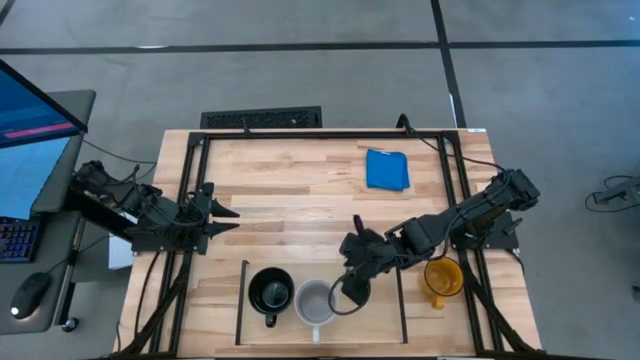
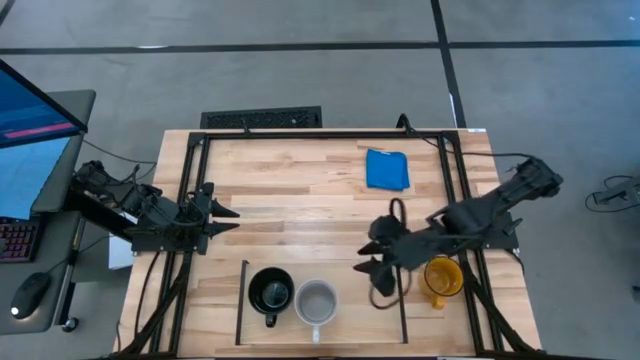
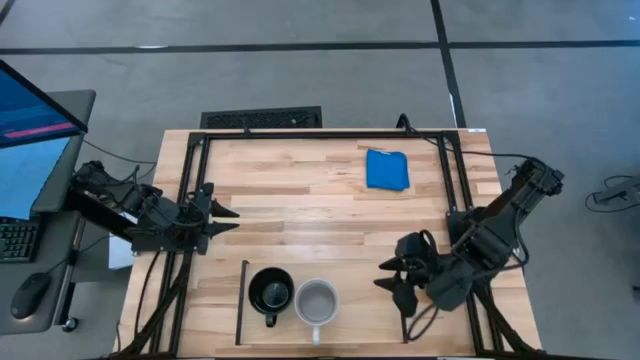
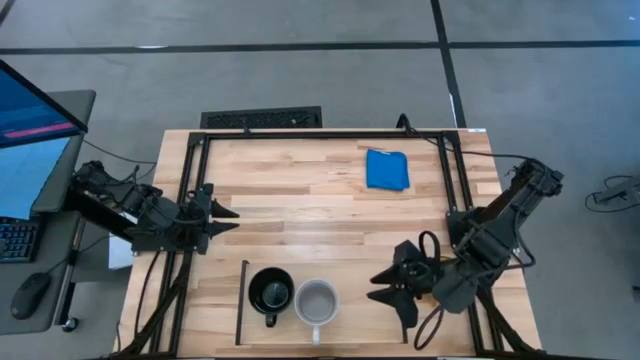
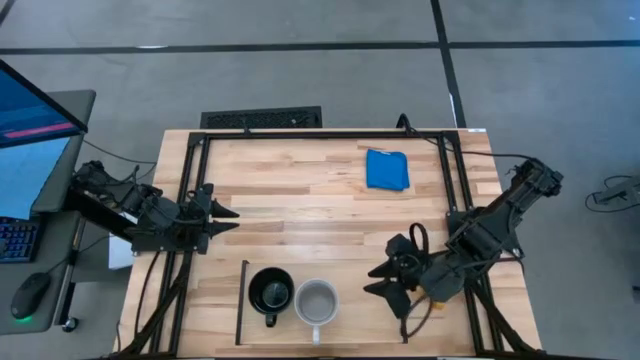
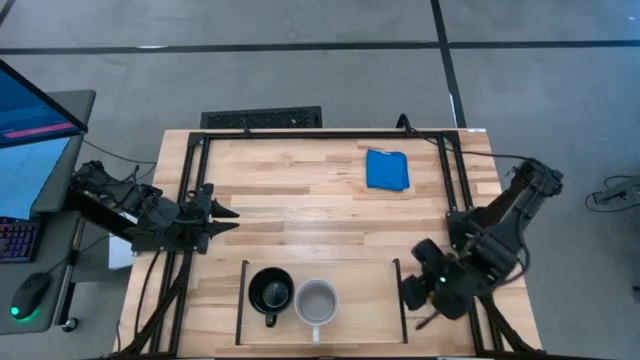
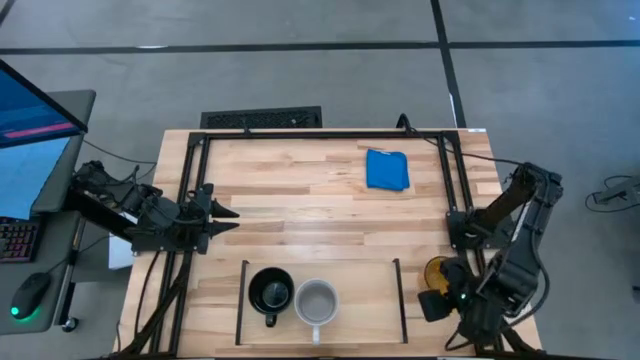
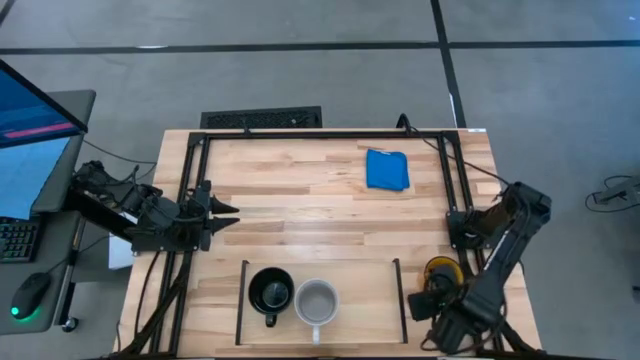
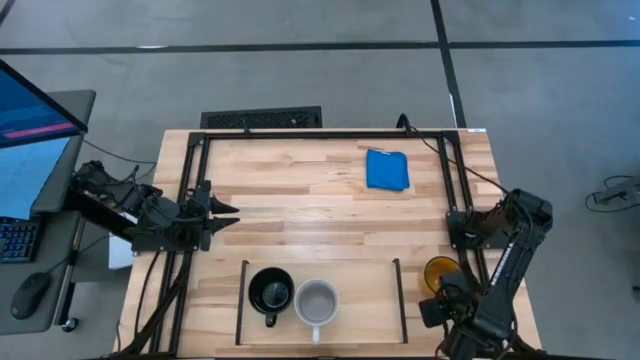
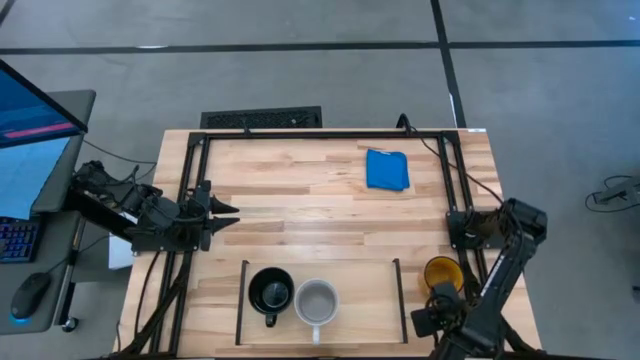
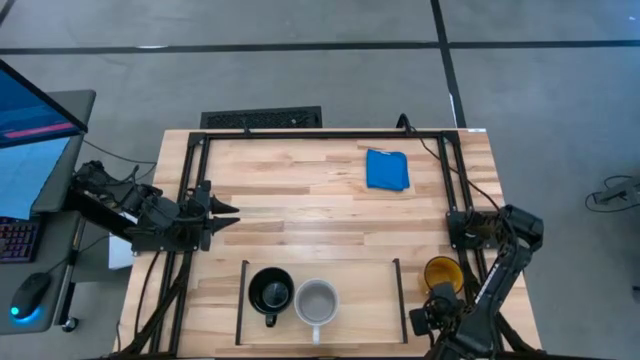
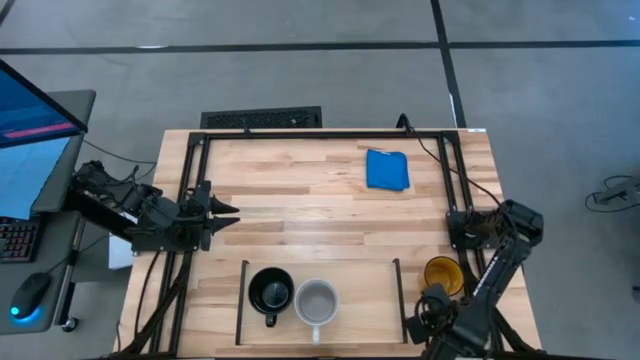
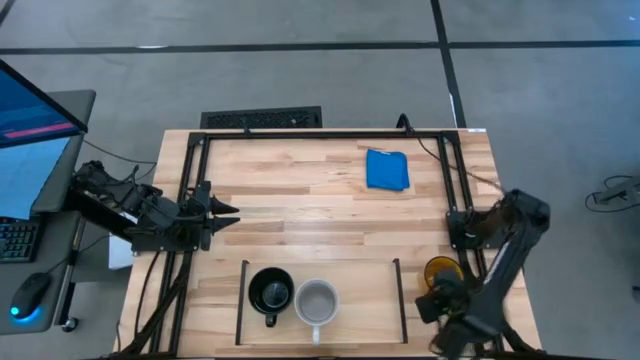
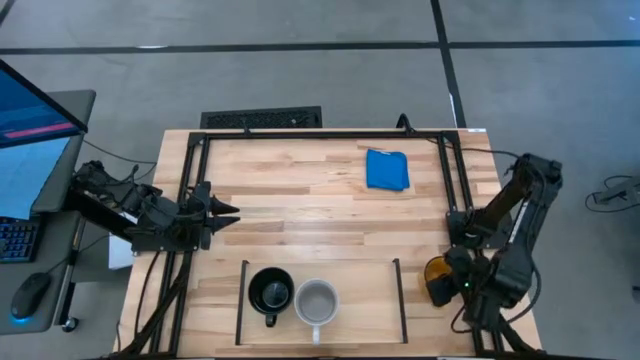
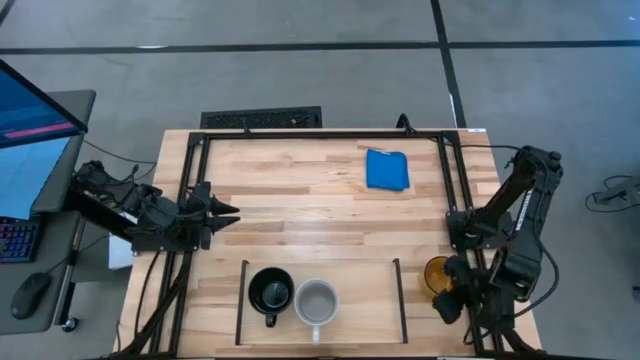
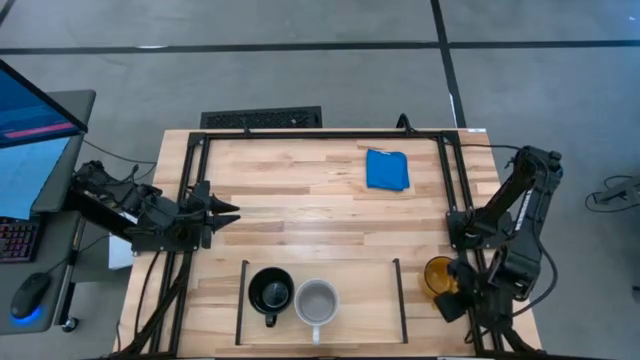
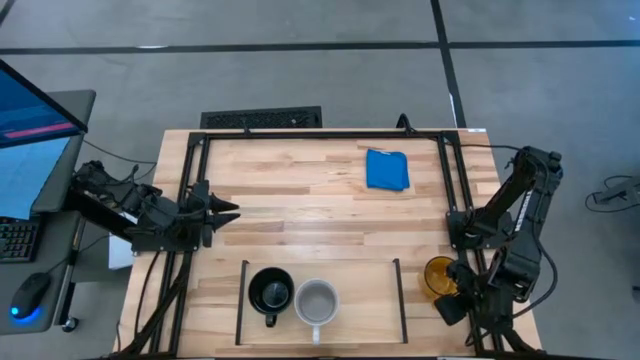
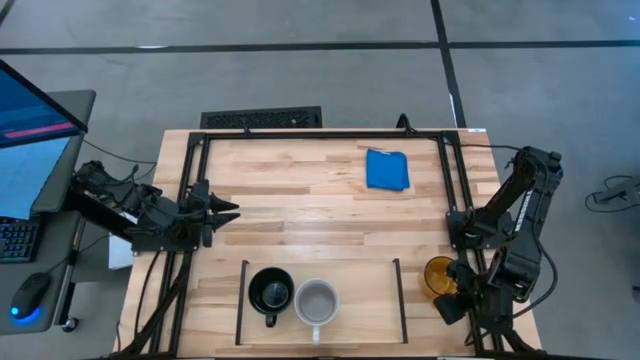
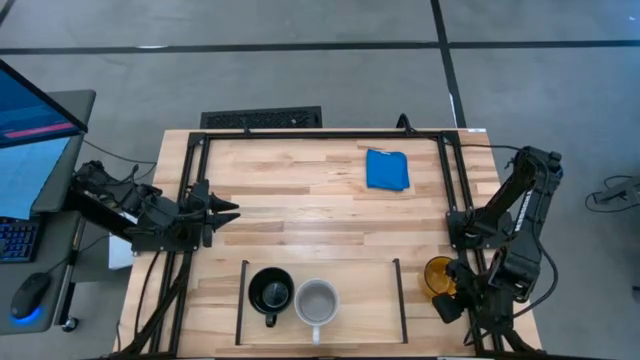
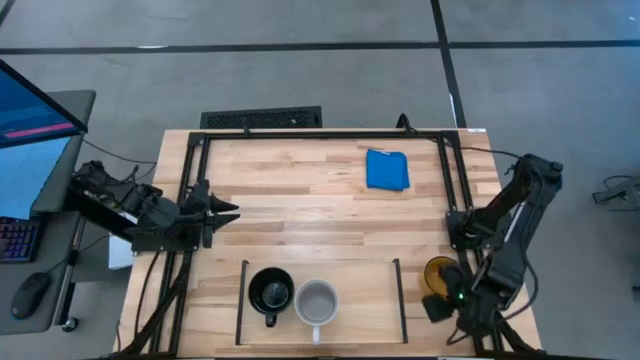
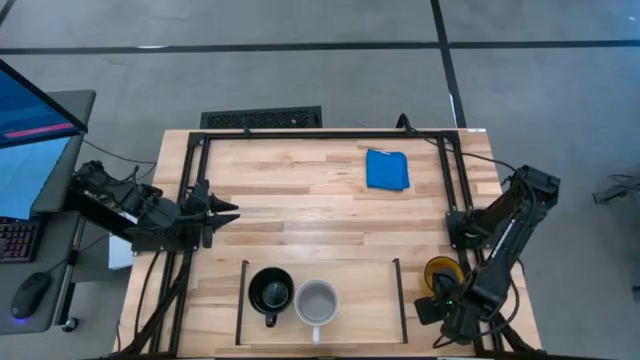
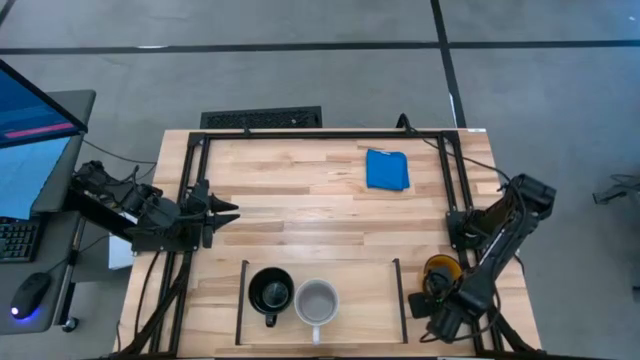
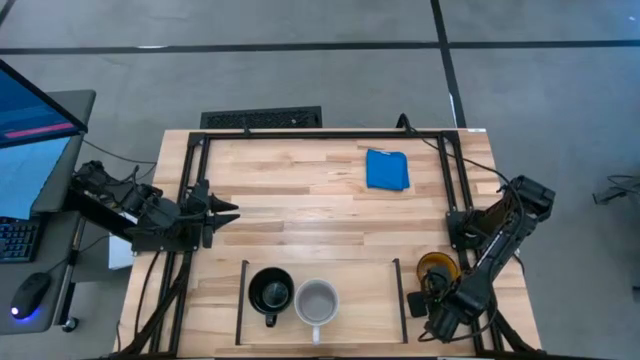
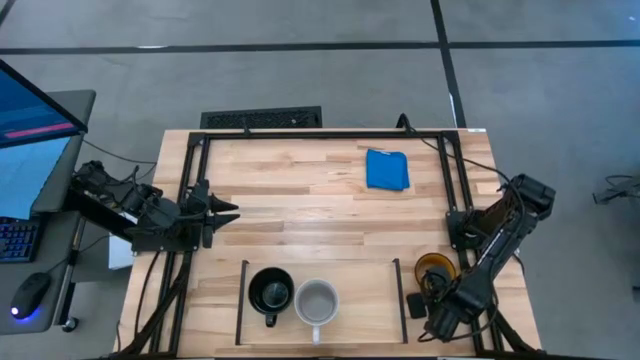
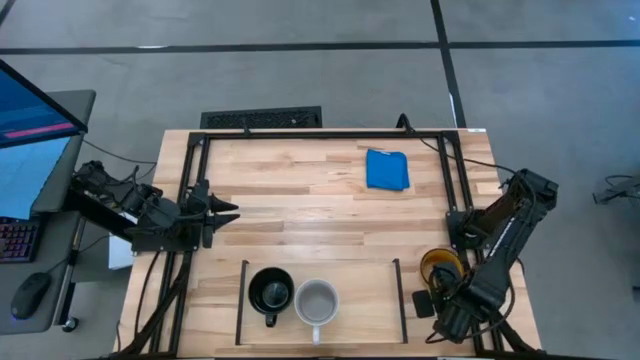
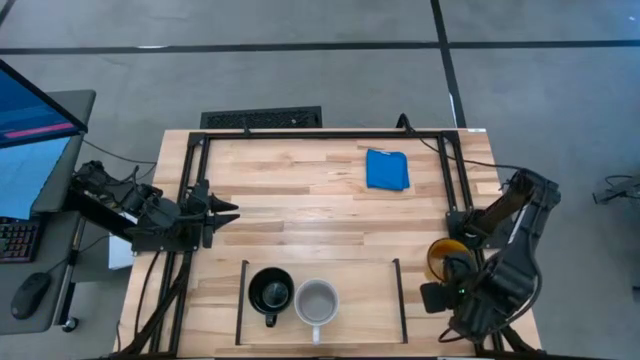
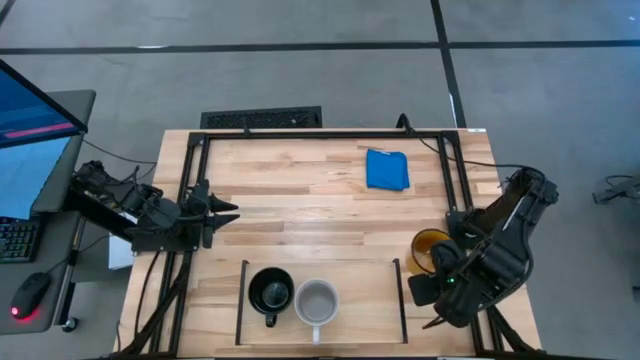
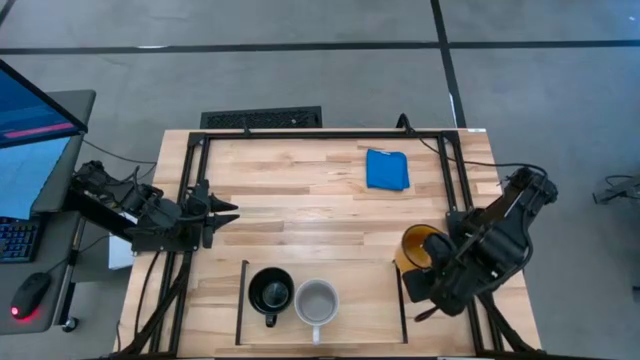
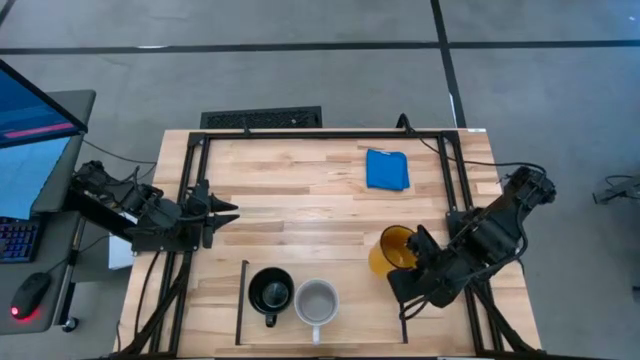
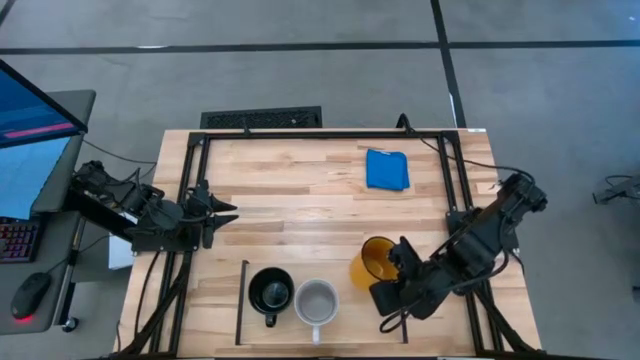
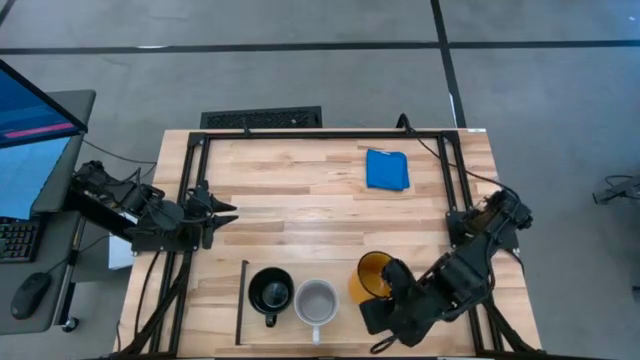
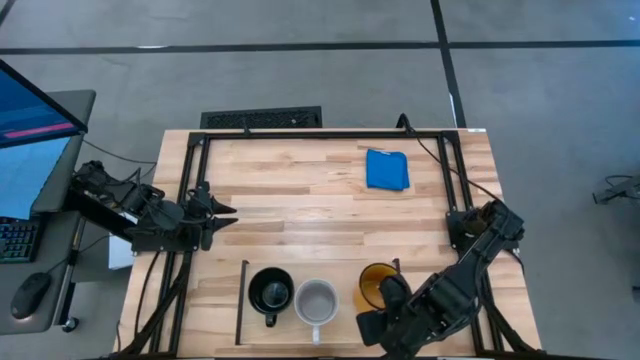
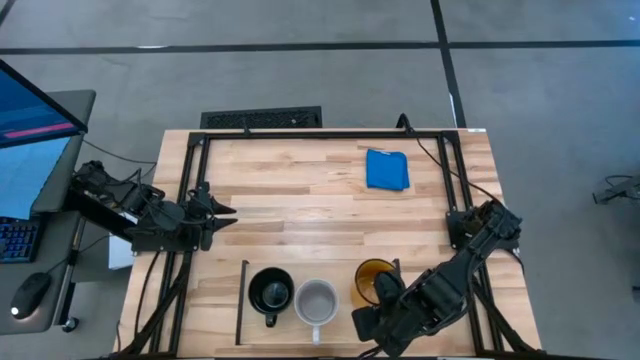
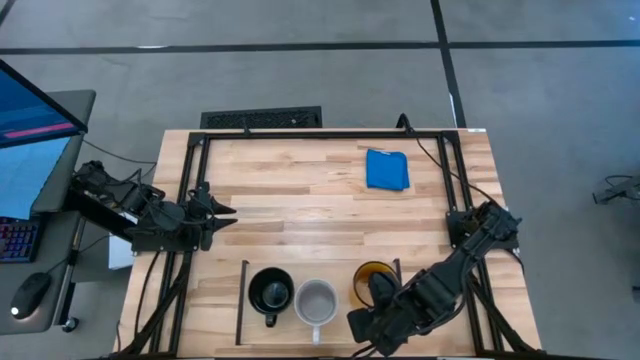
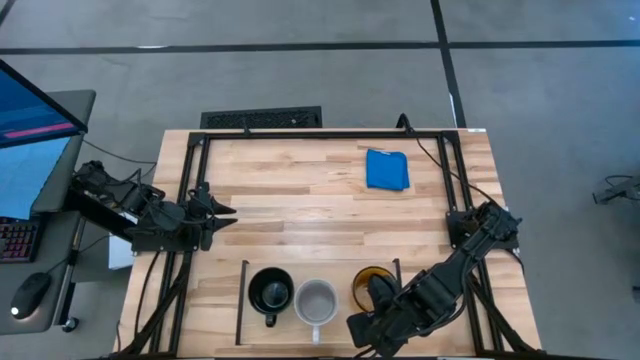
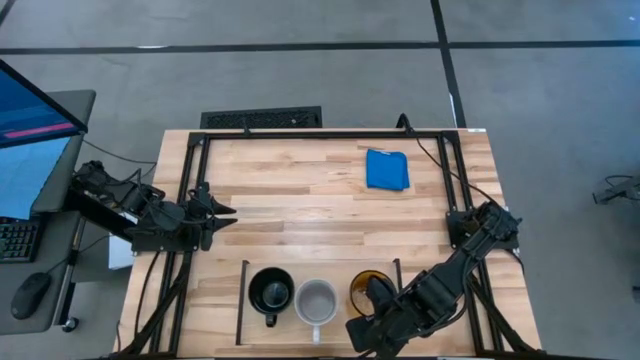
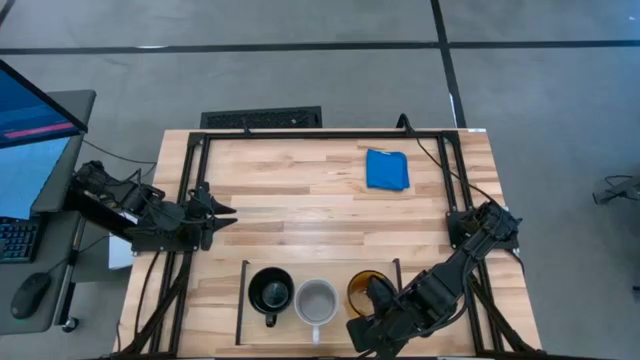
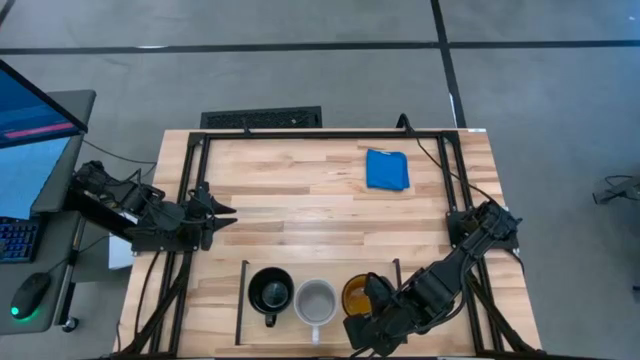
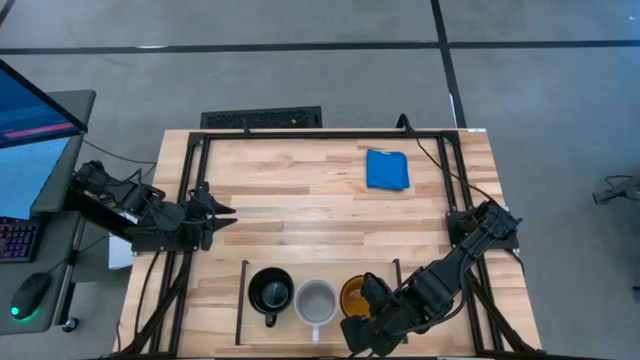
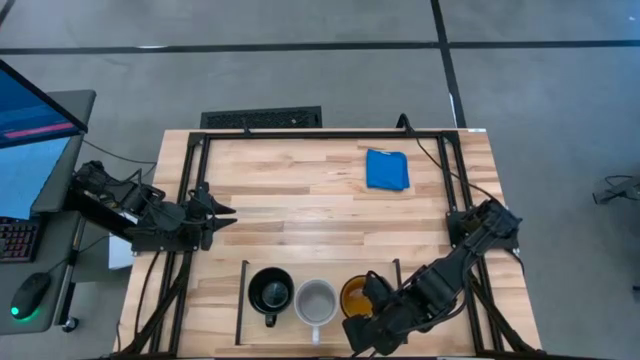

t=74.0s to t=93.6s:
Task: Stack small to large cups/mugs on shelf
Put the orange mug beside the white mug on the shelf

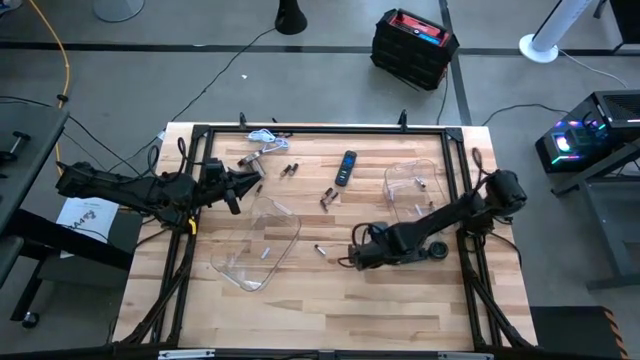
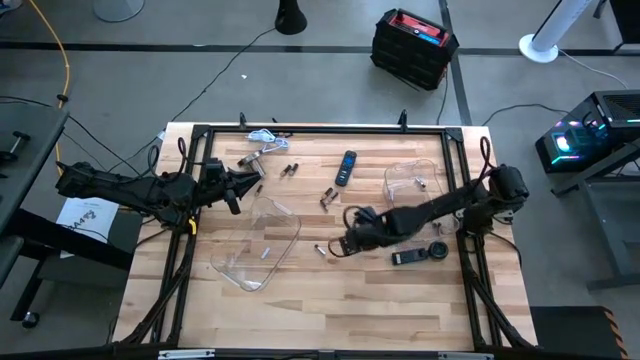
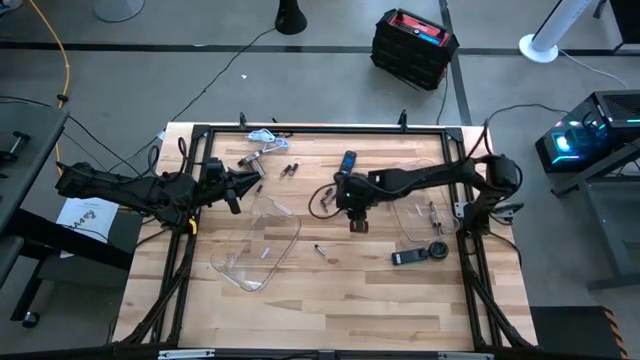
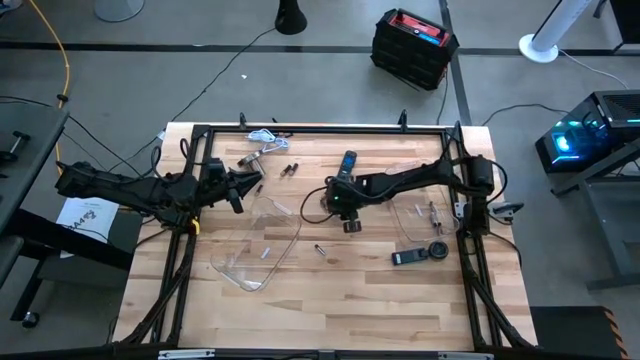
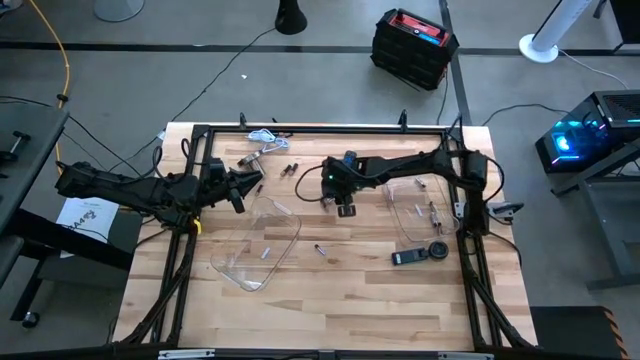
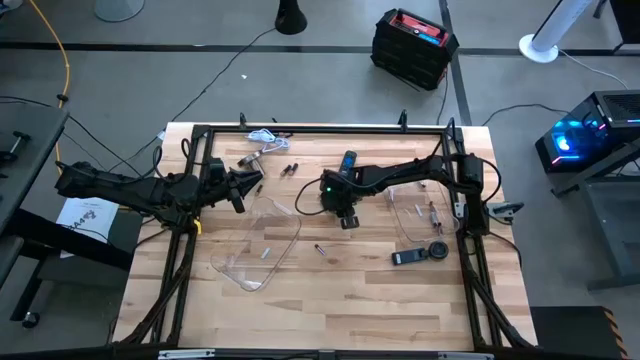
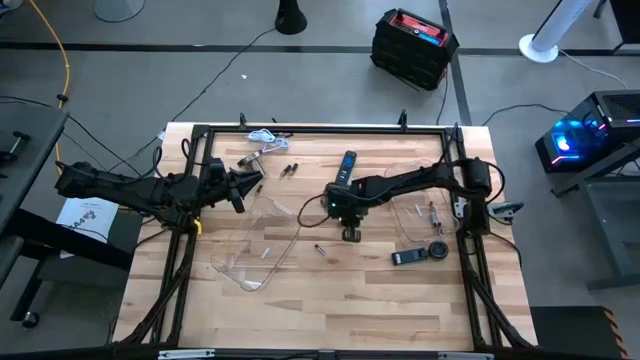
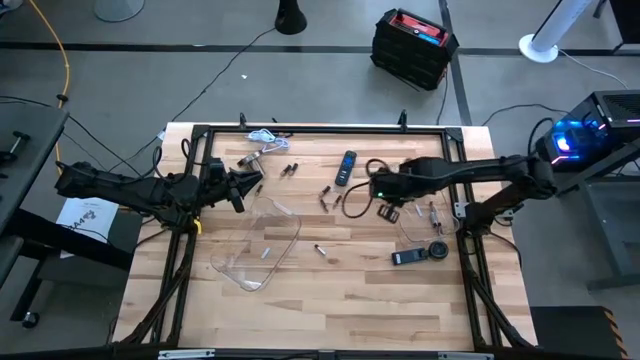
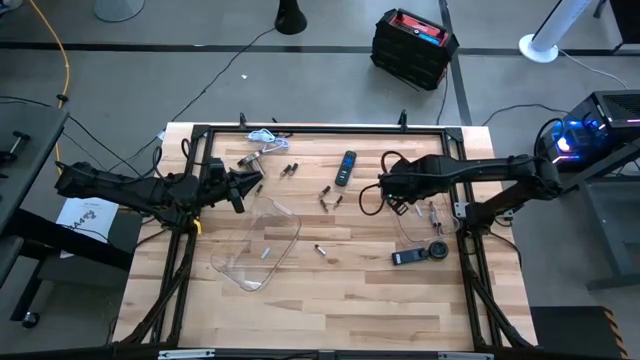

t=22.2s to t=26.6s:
Task: Sort batteries
Put the white battery into the right transparent bin
